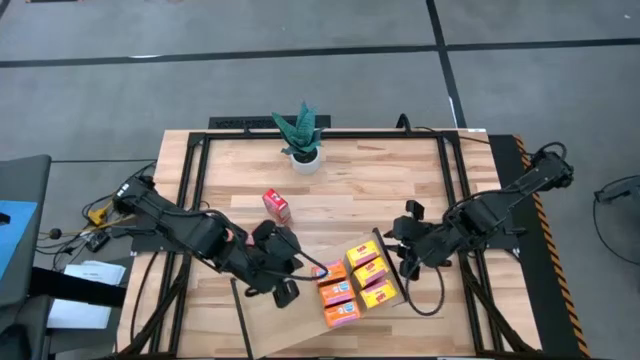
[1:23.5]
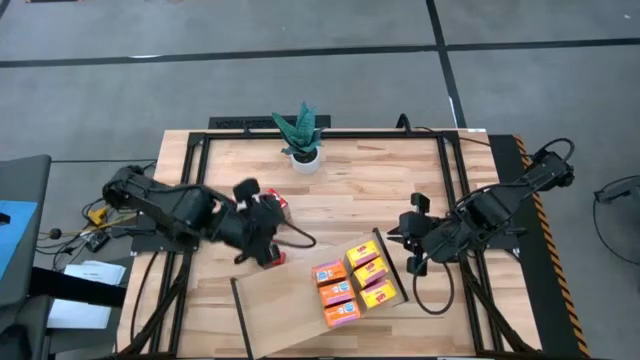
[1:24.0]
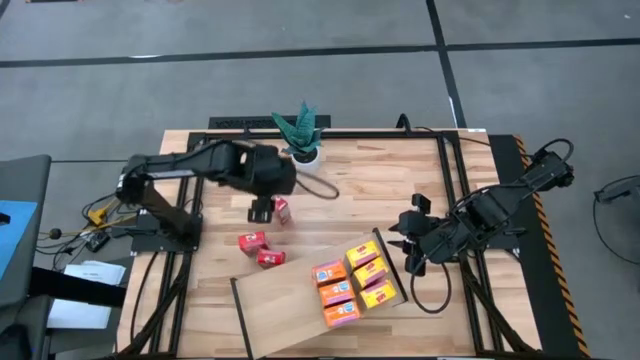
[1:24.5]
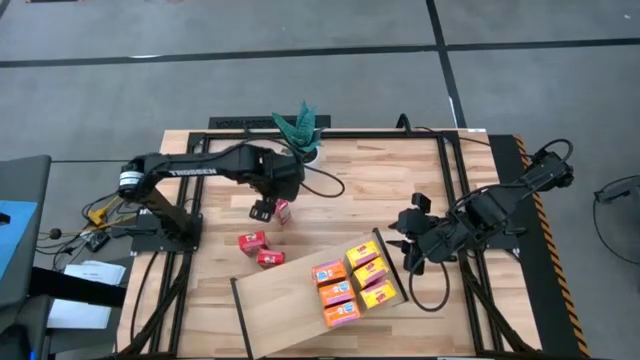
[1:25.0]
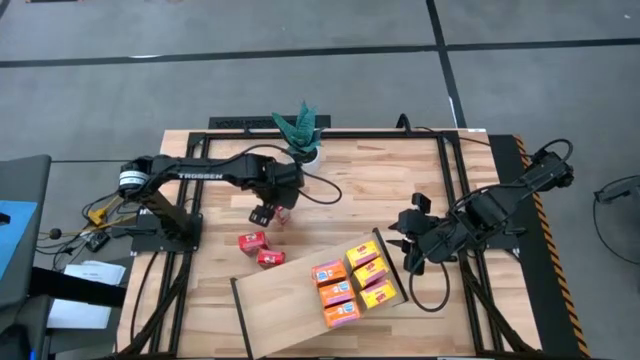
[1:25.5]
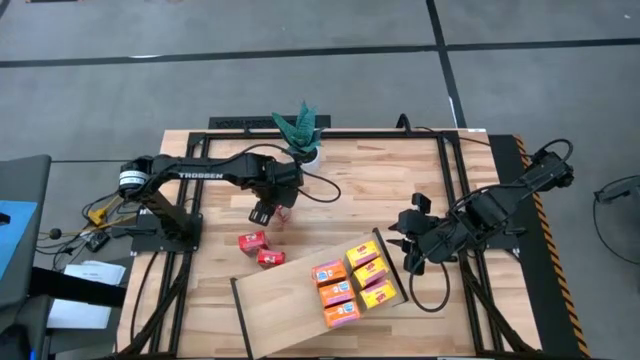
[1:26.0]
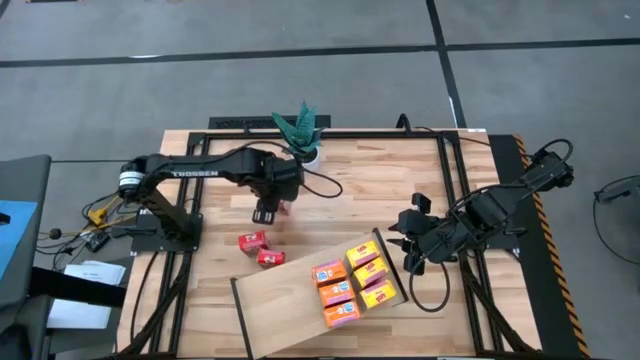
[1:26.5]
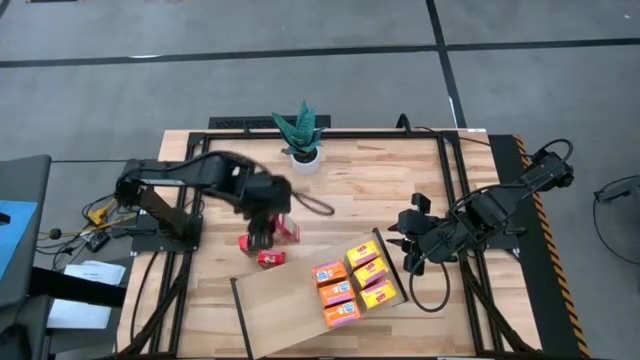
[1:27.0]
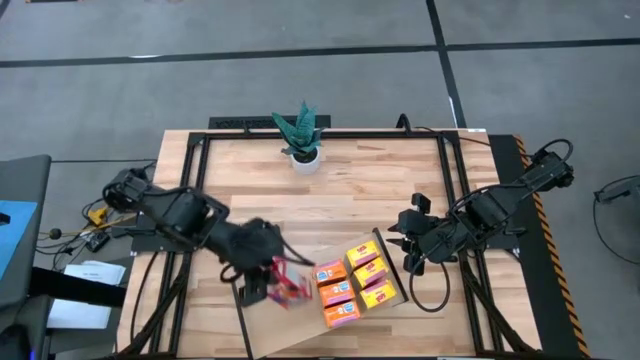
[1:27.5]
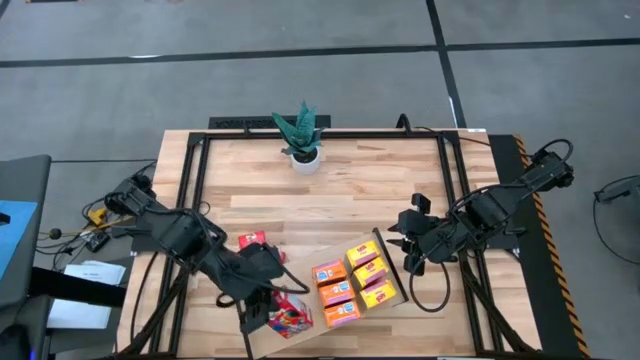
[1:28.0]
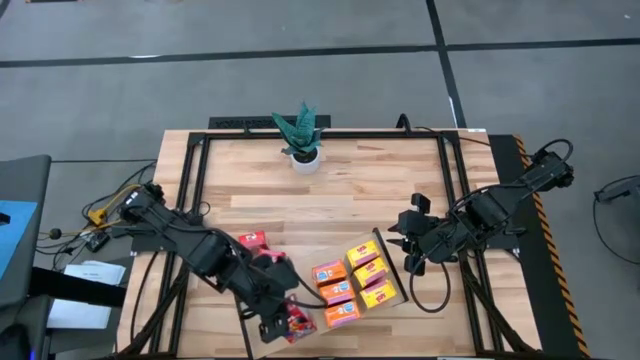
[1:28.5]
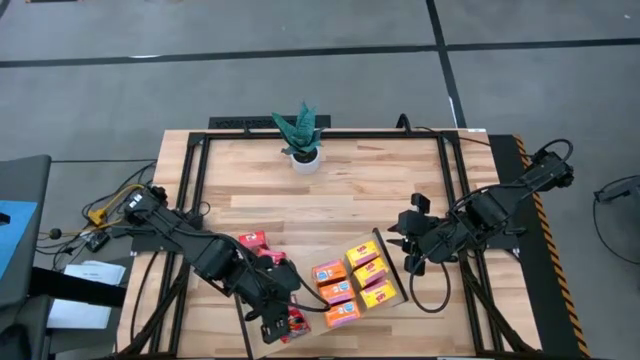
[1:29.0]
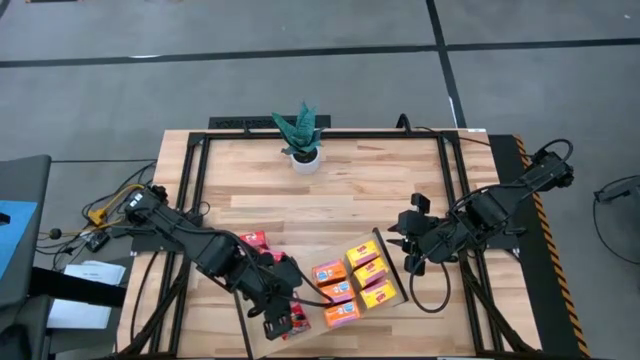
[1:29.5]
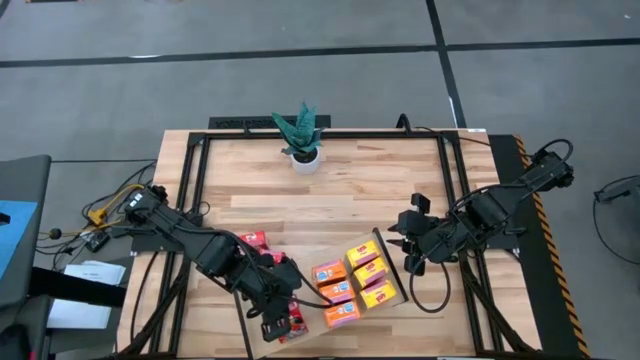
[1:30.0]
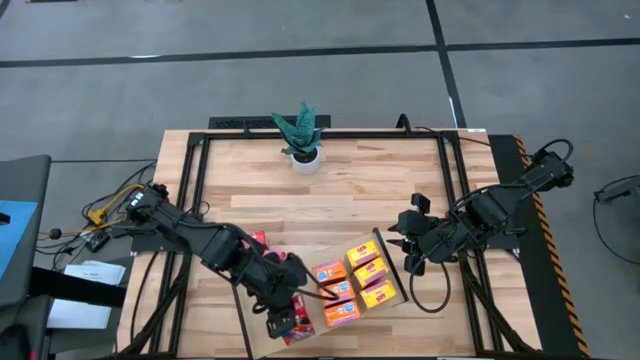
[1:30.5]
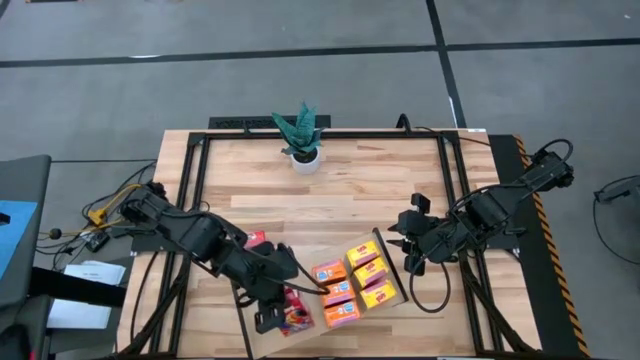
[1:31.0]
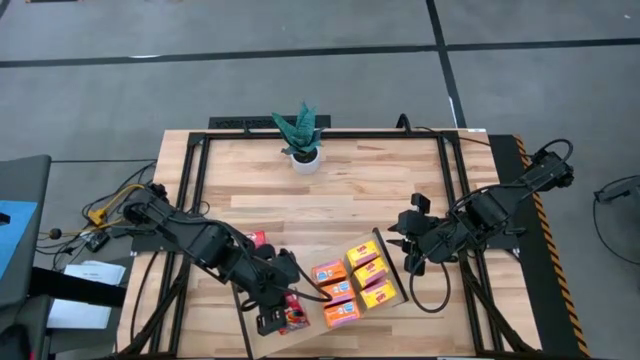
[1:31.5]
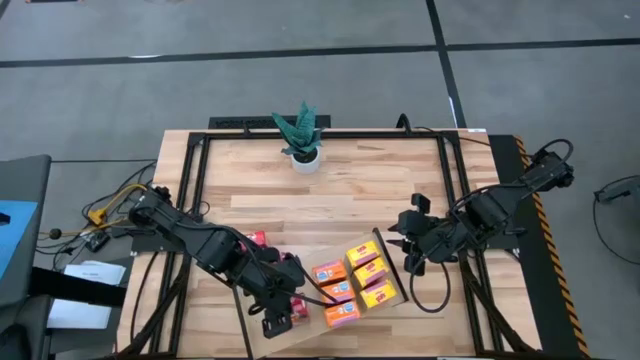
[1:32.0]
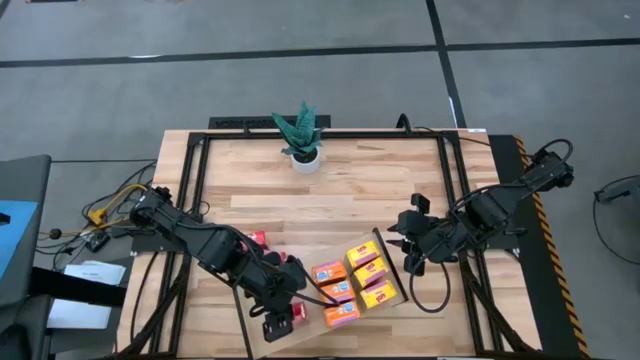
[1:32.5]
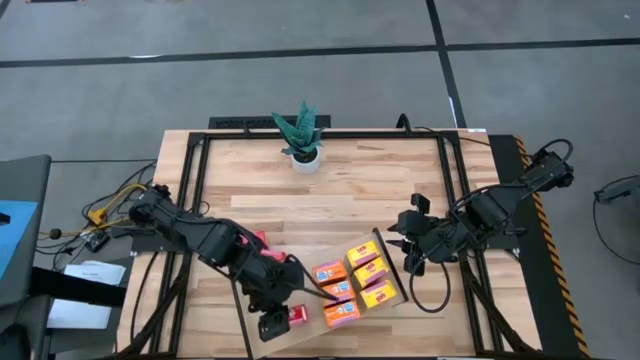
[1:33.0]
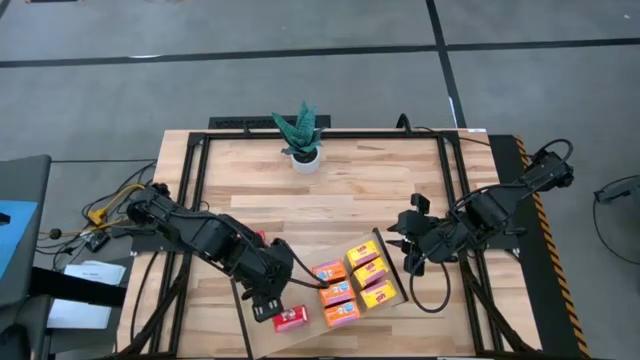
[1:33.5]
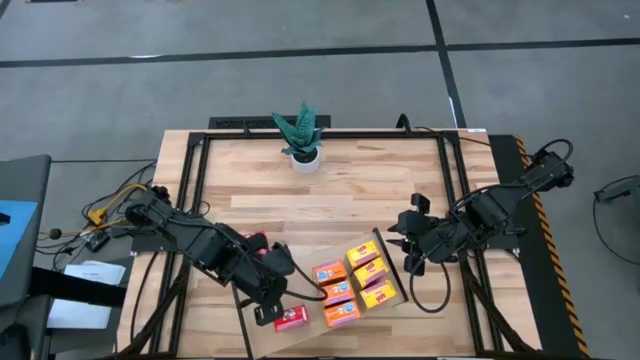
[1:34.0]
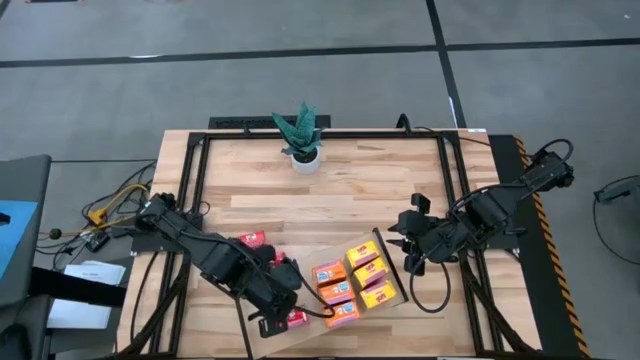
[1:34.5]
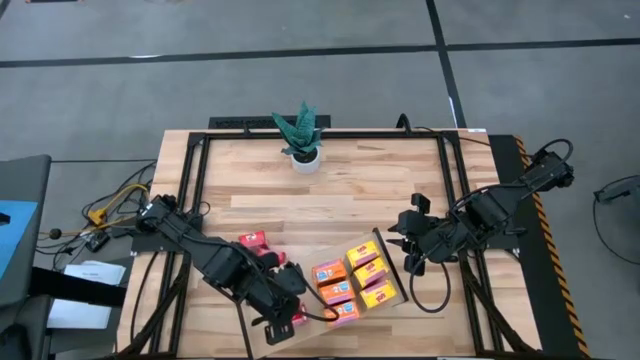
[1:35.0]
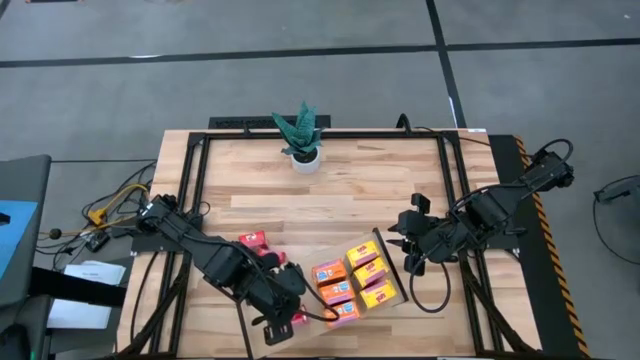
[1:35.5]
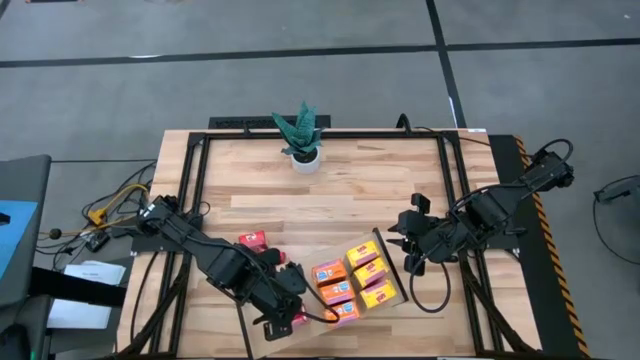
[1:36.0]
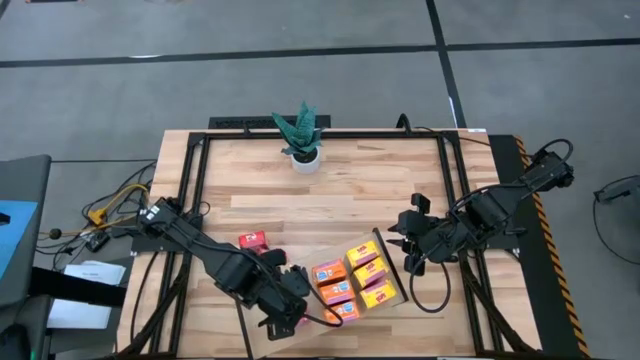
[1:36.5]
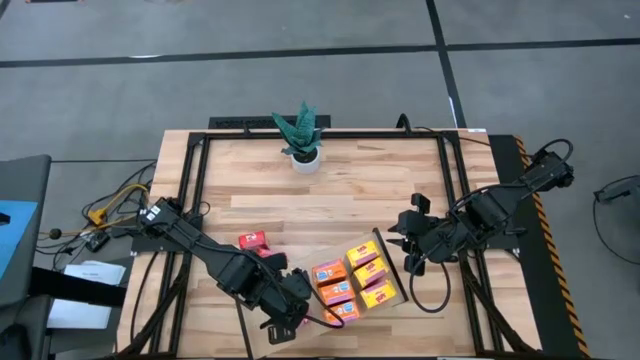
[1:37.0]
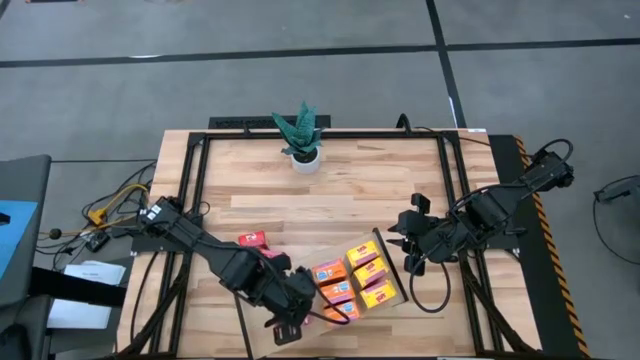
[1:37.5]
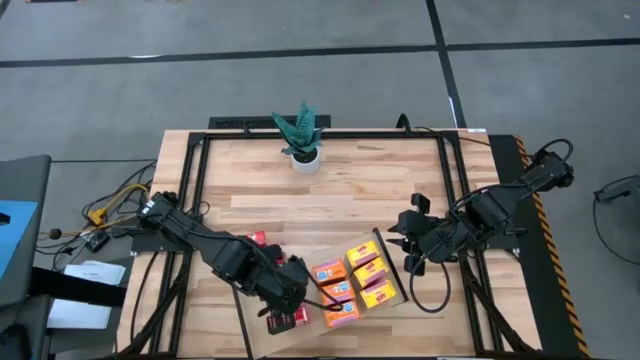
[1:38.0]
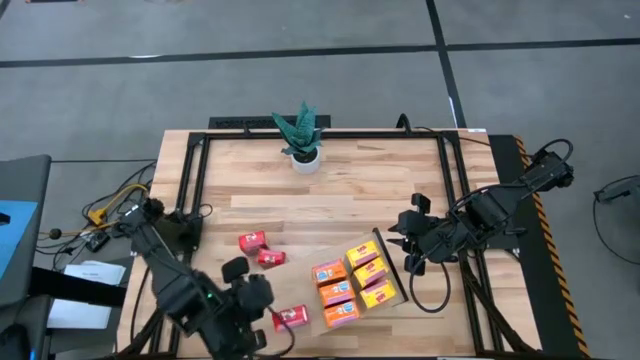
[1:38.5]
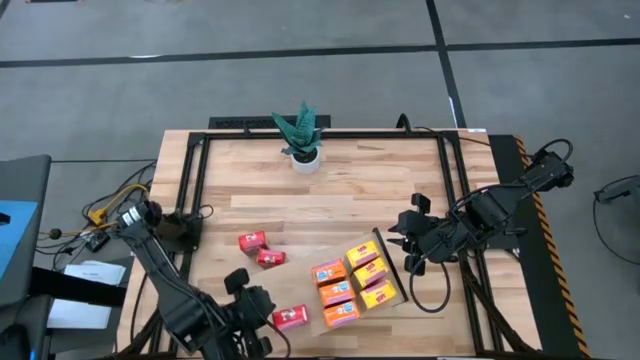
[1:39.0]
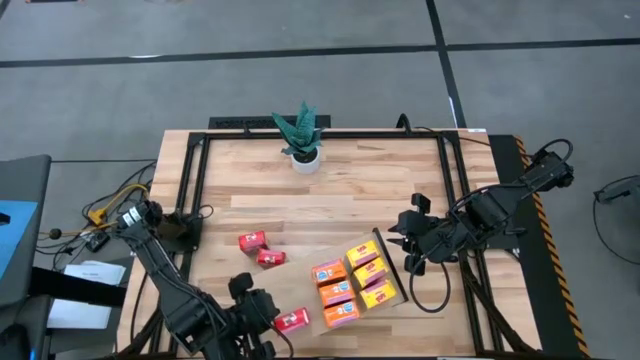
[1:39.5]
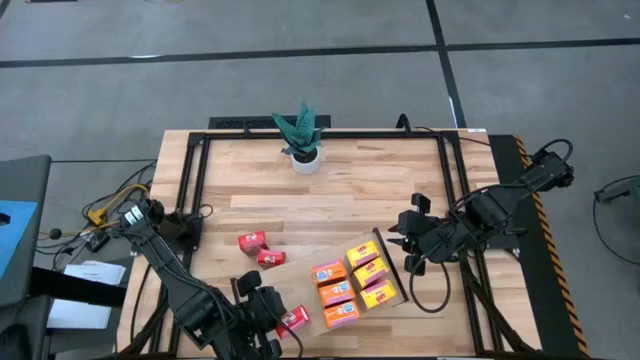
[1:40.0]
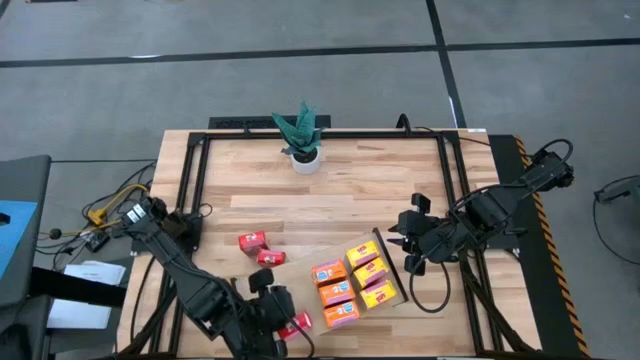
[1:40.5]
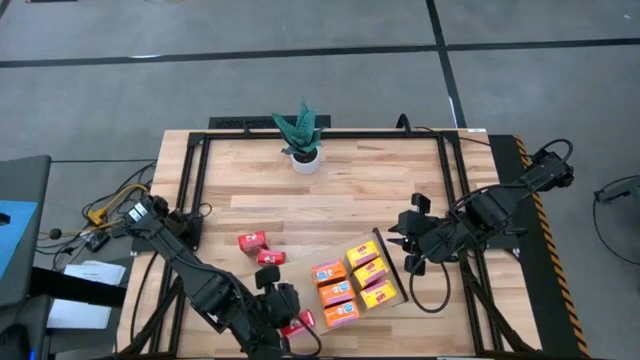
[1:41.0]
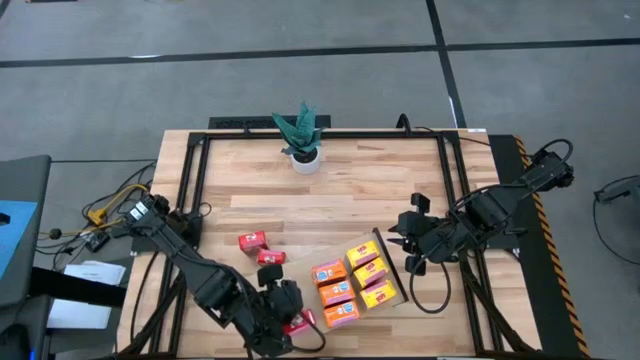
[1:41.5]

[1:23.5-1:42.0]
Task: Stack cereal on shelf
Put the top red cereal box on the shelf

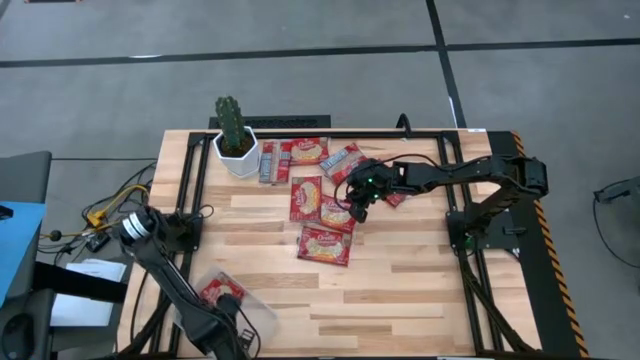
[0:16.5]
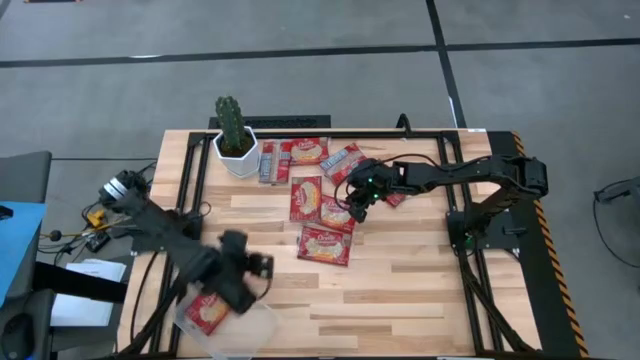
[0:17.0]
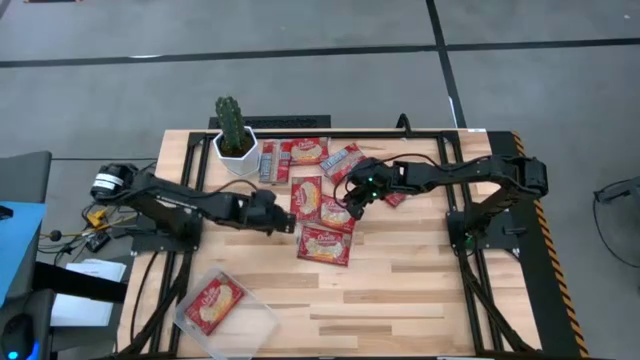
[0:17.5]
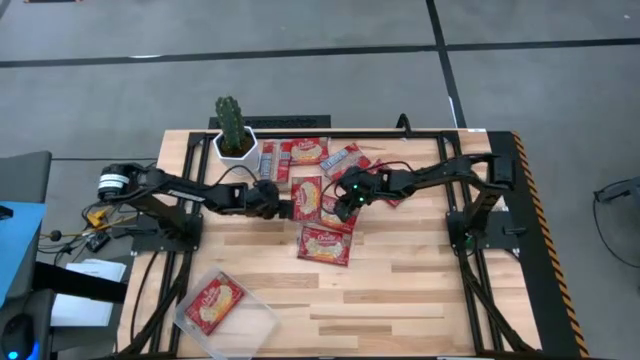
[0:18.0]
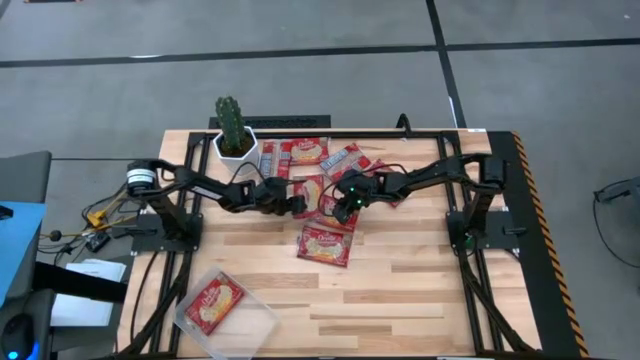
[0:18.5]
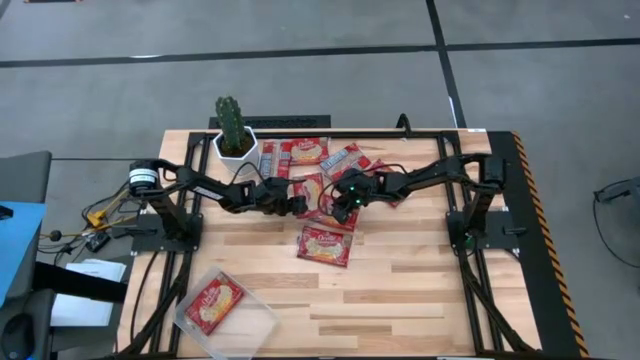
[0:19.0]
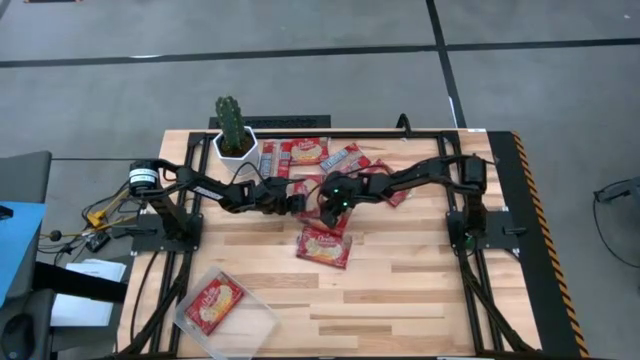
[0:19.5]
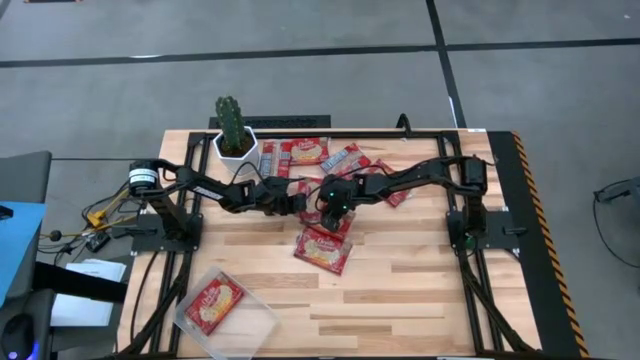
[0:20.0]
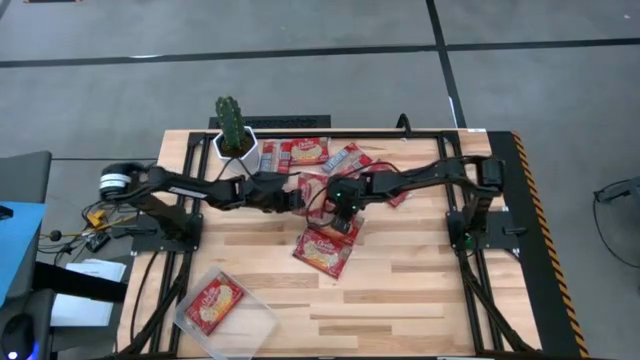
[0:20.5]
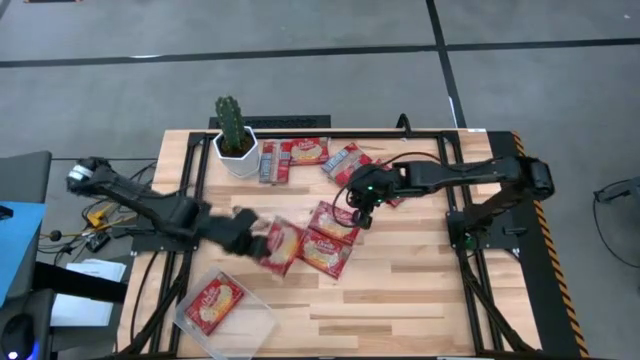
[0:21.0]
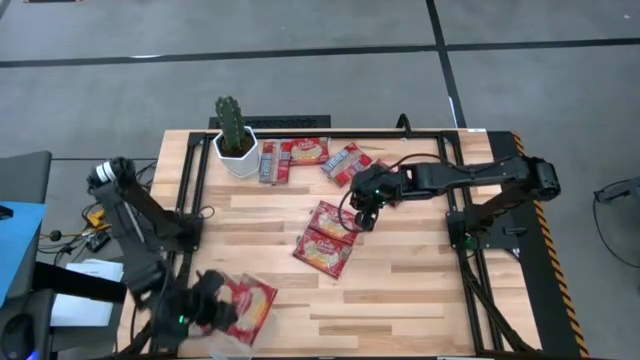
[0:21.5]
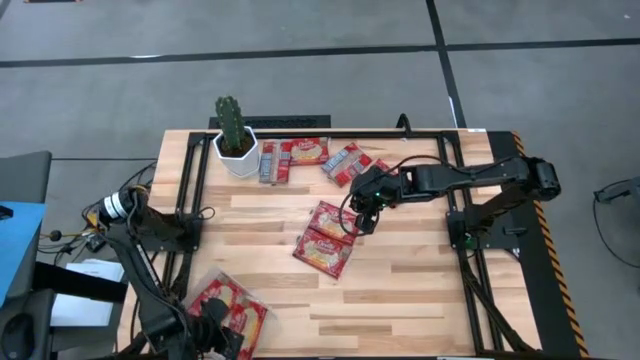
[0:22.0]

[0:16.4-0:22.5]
Task: Sort popcorn bags into baskets
Put the red popcorn bag into the transparent bin
